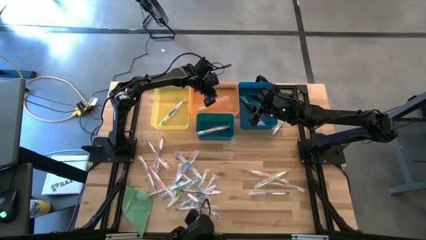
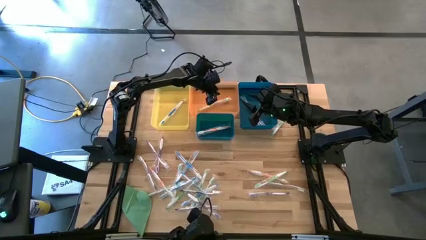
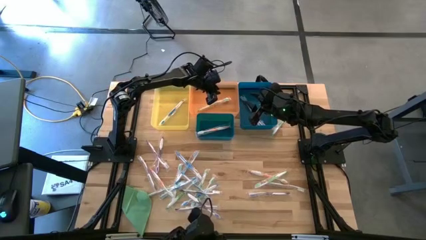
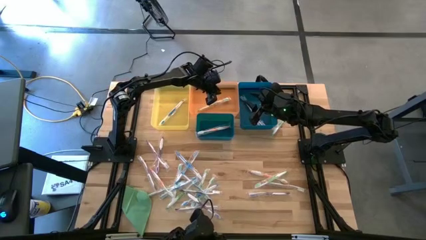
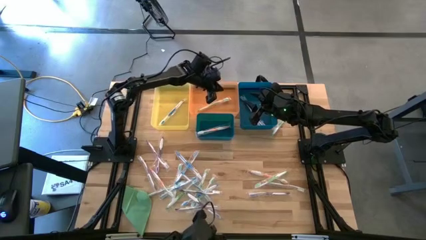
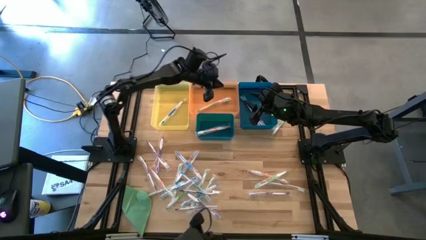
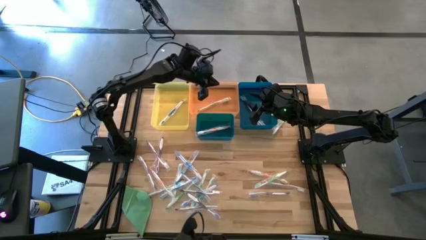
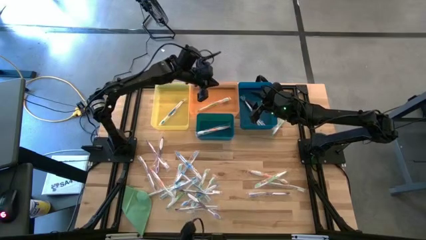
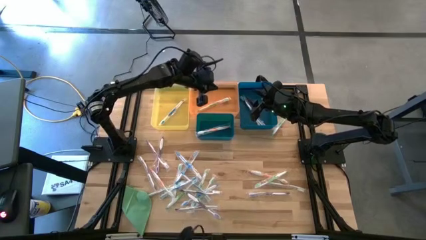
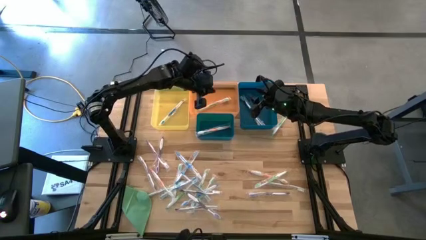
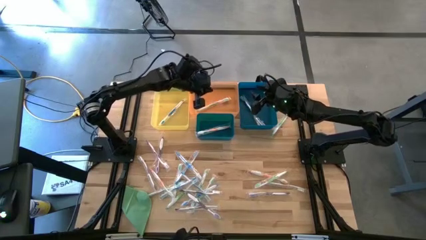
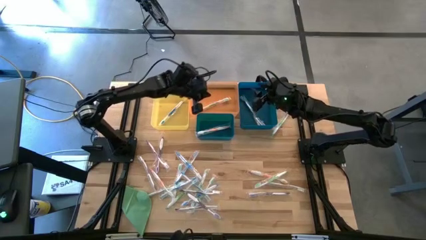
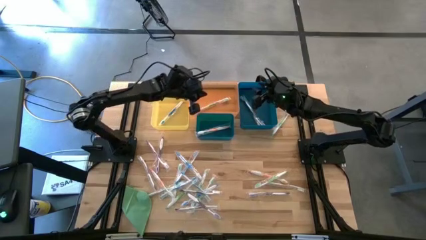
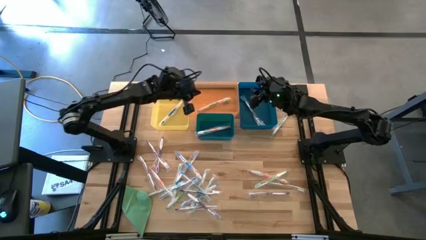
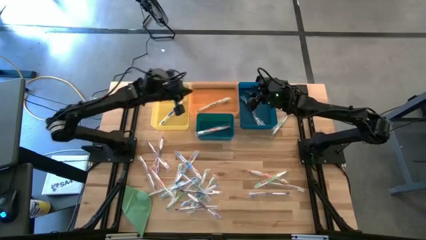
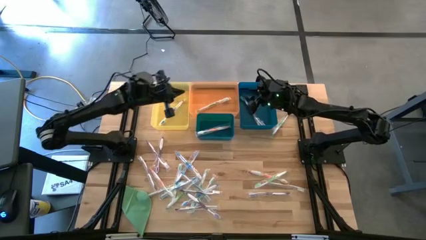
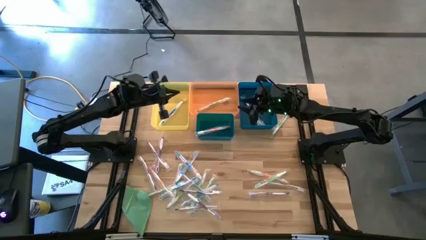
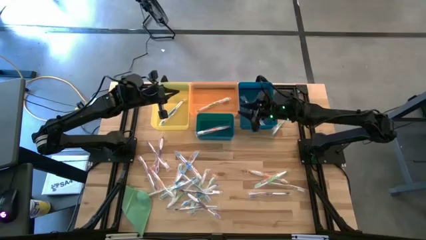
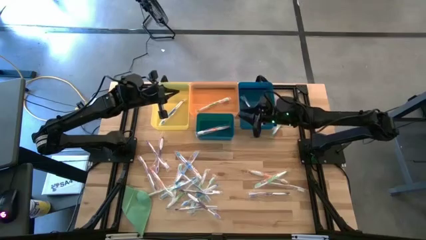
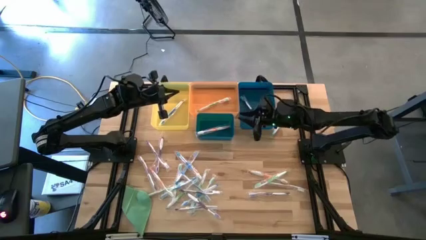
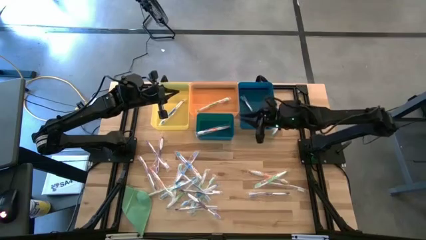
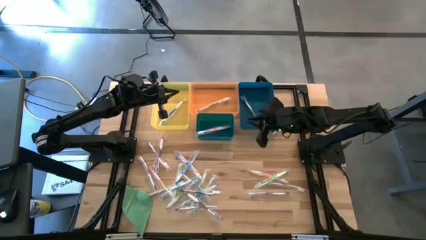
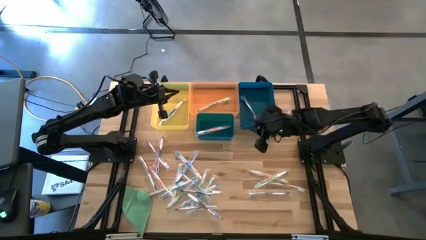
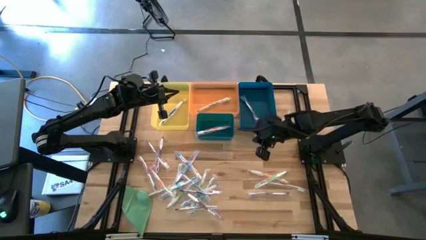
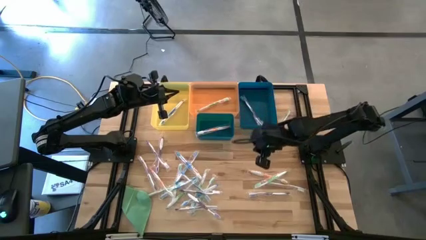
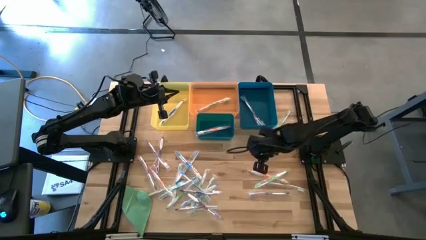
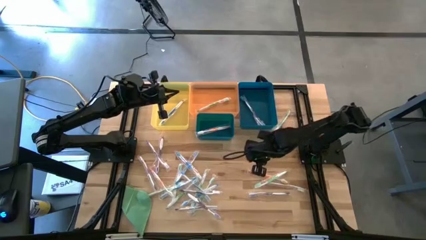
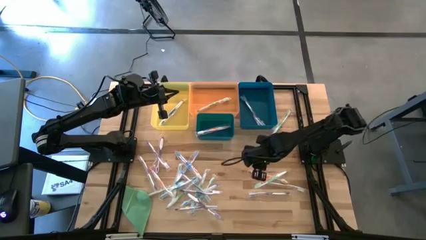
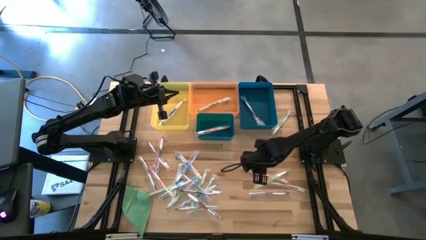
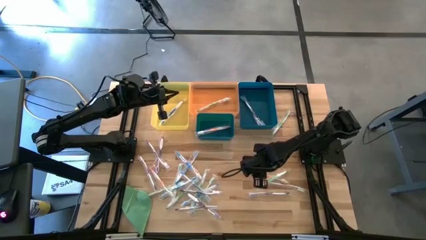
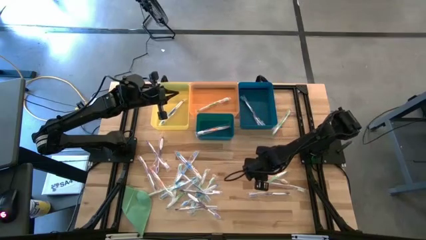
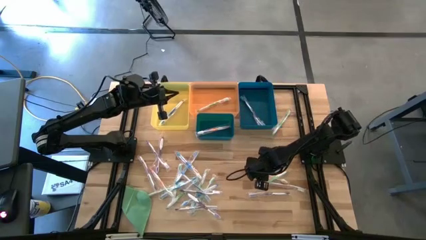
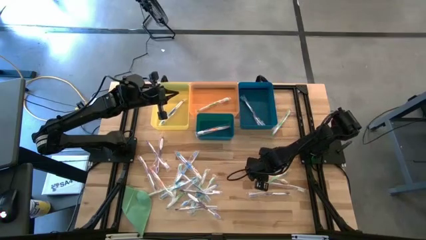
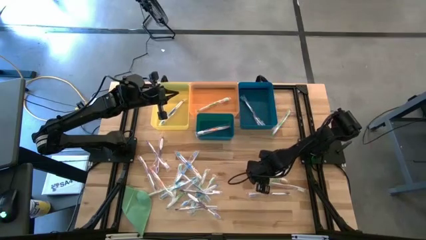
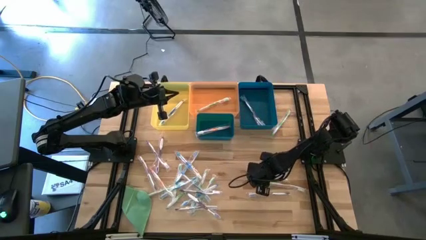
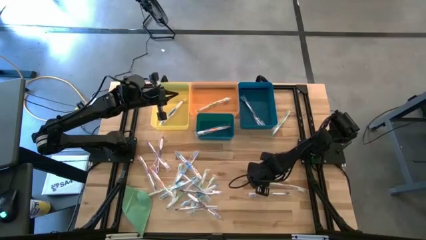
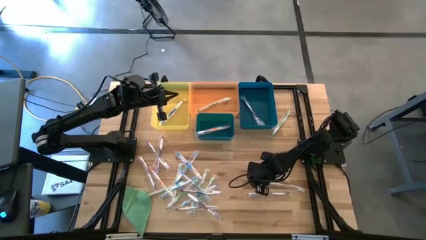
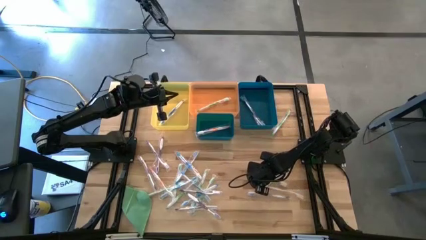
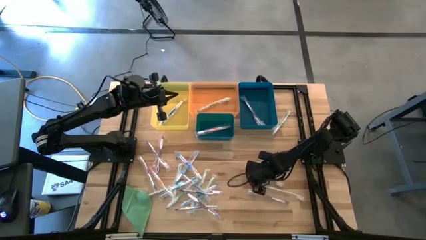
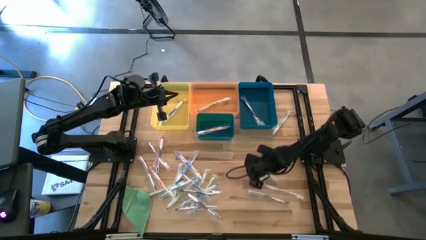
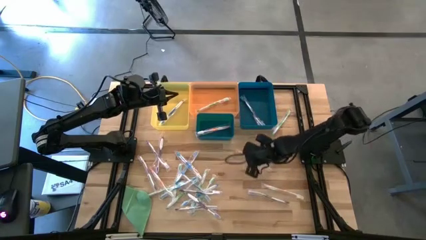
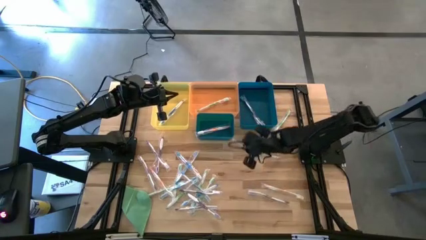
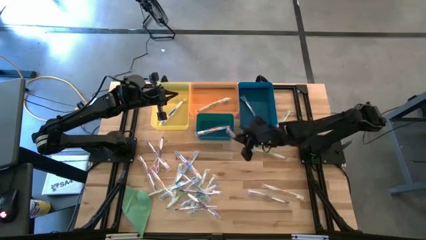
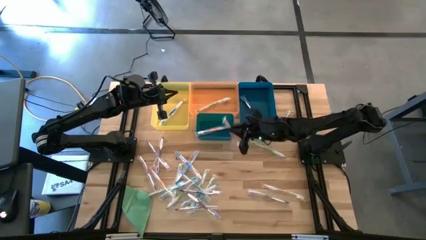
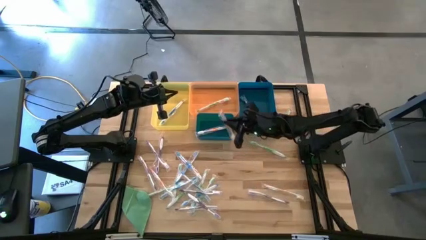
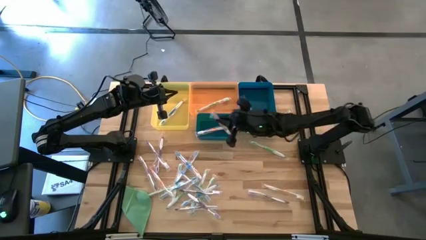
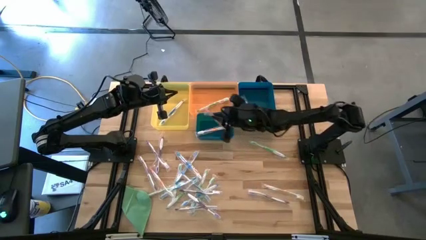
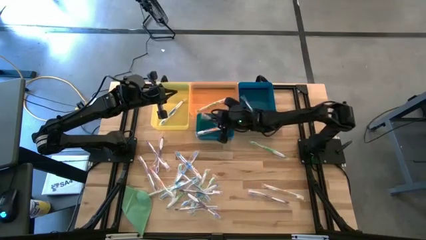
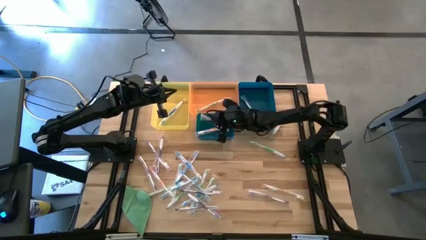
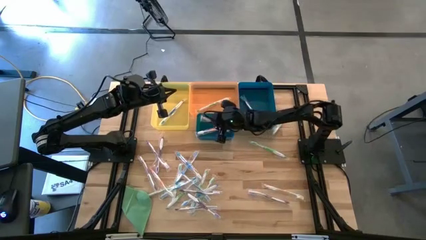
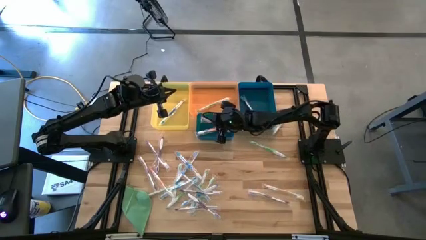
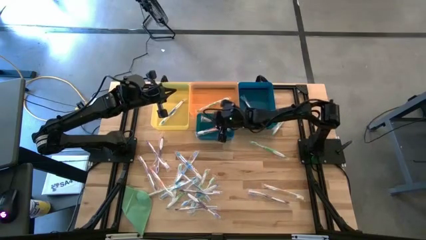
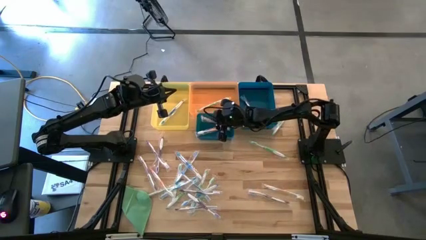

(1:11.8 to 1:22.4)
Task: Pick & Place Toothbrushes
Put the orange toothbrush into the dark green bin
